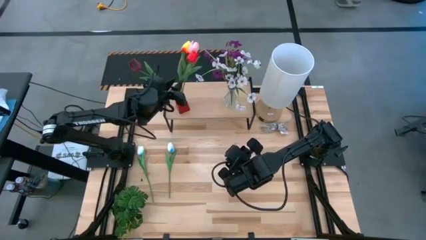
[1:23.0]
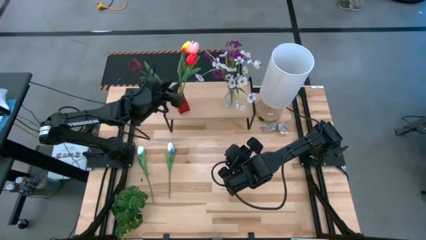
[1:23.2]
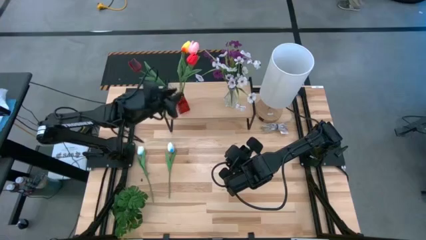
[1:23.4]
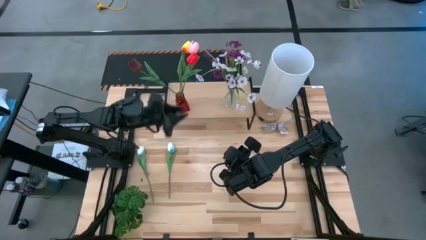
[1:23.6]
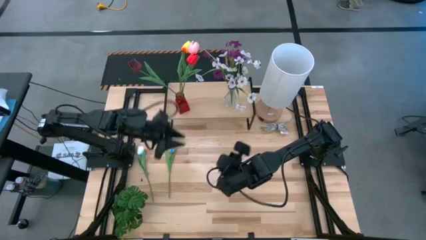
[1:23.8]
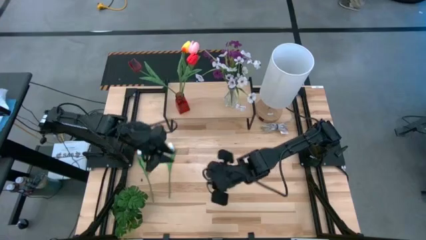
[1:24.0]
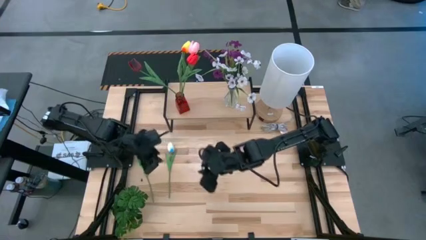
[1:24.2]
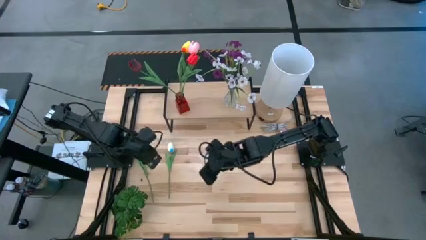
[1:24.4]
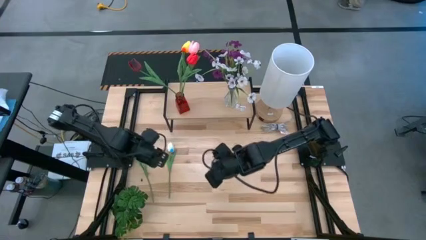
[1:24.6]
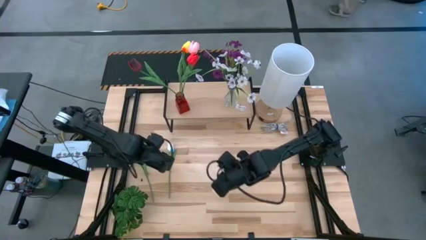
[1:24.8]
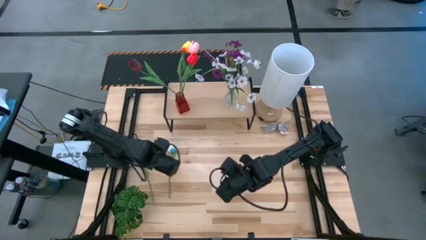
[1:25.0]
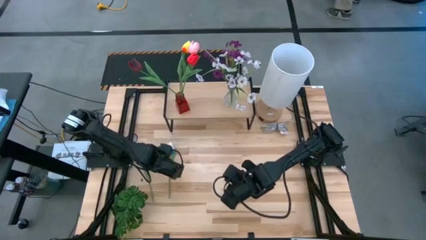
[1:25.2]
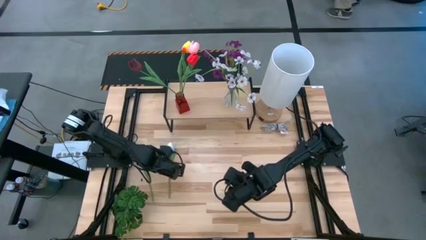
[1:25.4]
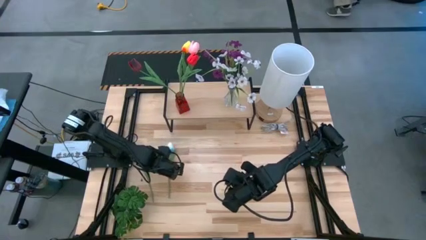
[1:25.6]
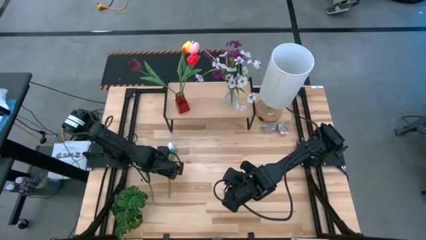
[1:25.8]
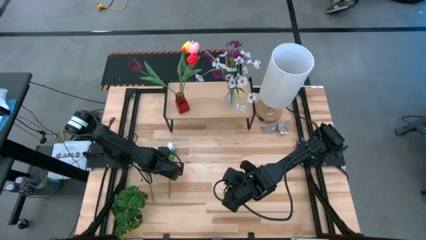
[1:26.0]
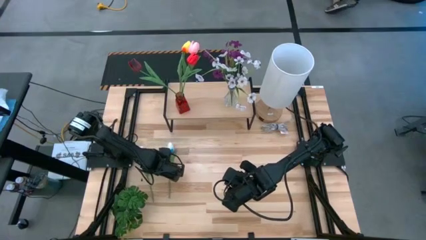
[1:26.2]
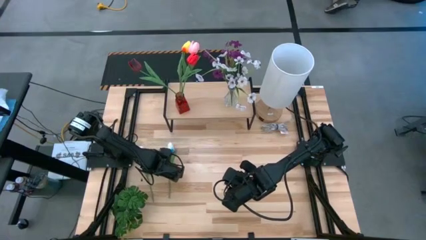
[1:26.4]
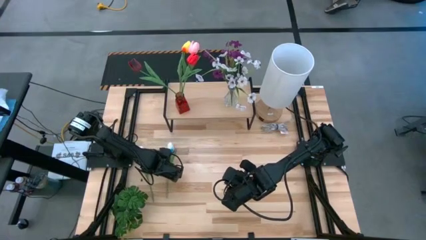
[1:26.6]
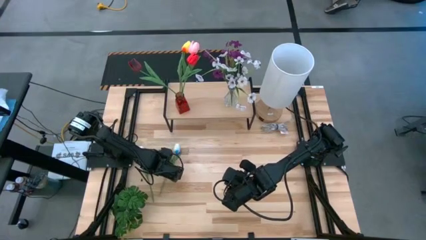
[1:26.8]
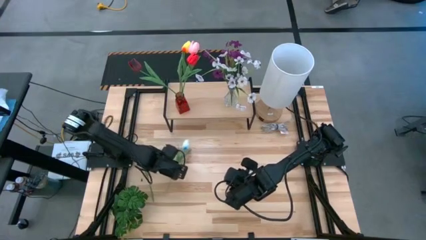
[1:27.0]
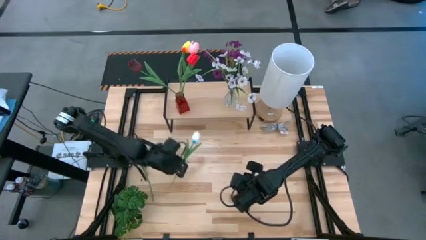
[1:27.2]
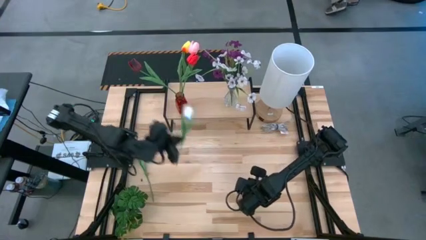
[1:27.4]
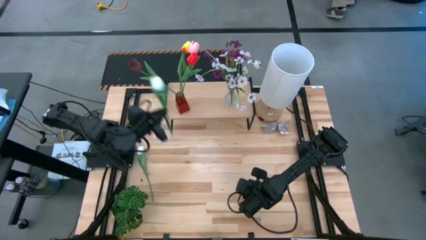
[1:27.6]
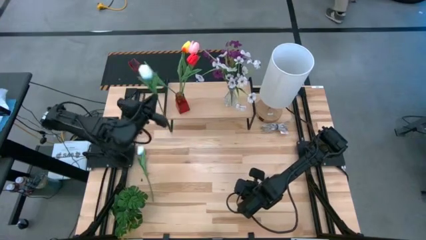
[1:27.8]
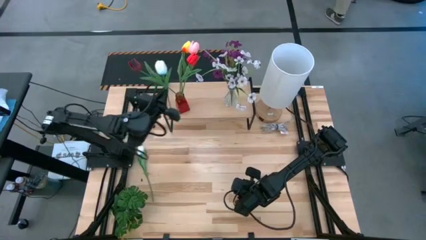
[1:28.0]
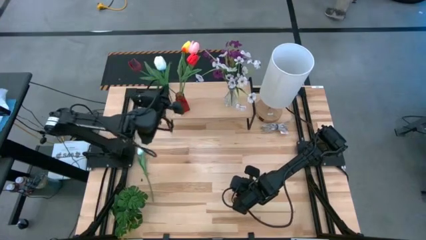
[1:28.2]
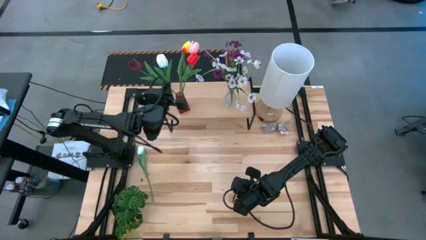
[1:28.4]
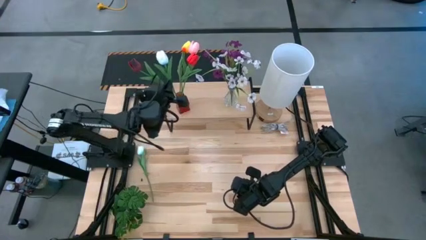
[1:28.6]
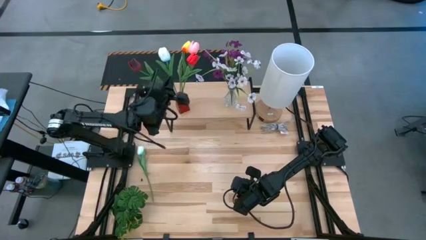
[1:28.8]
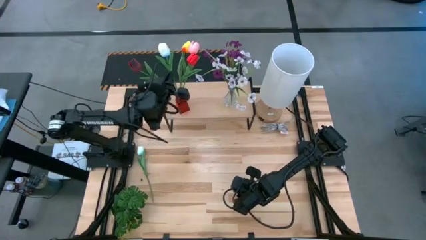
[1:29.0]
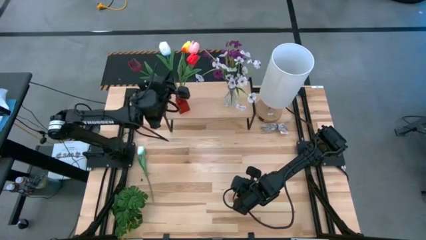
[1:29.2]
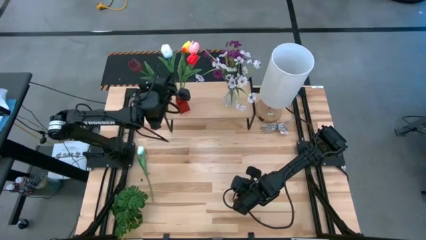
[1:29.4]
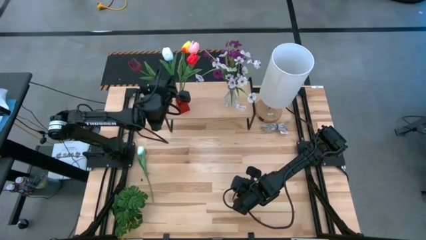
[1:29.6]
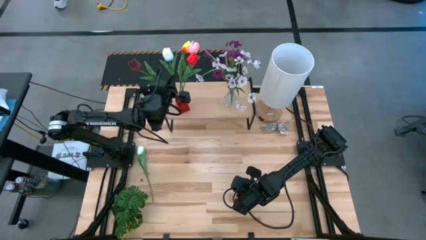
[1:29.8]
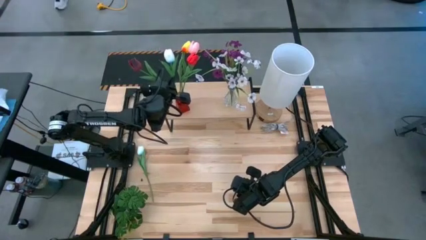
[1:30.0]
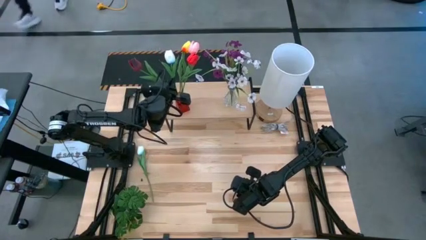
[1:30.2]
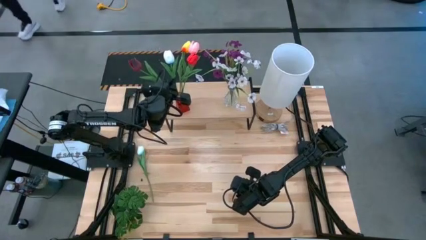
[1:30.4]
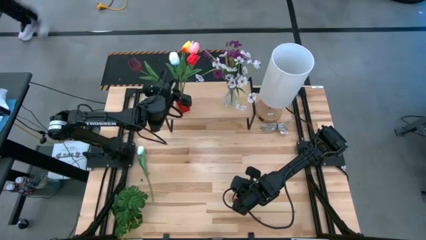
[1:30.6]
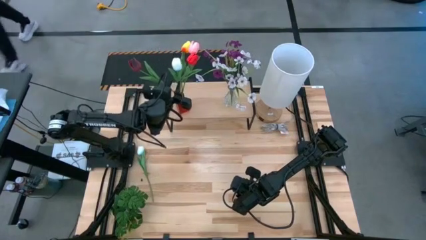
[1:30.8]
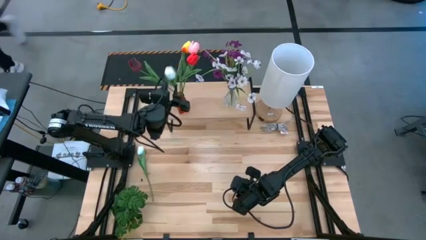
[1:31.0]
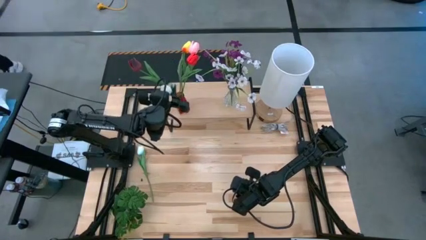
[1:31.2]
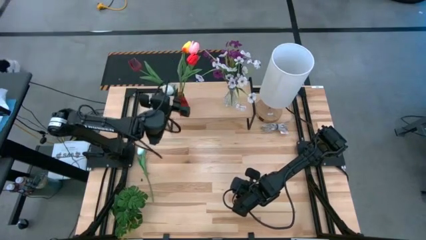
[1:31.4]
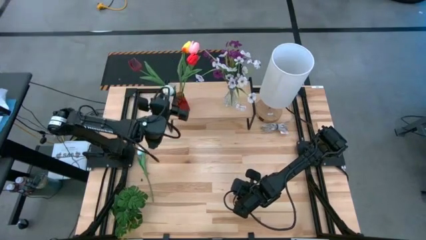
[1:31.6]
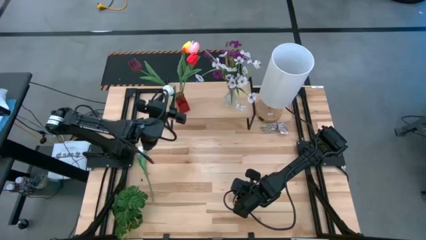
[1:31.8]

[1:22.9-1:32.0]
Task: Pick and place flowers into a vace then onto a shelf
Put the right white flower into the red vase on the shelf

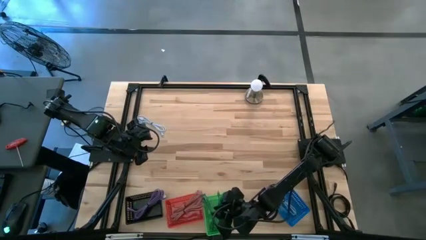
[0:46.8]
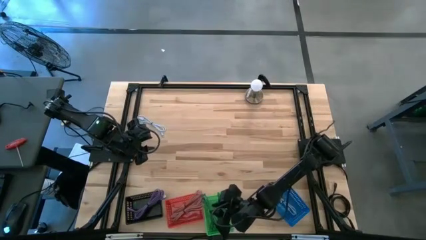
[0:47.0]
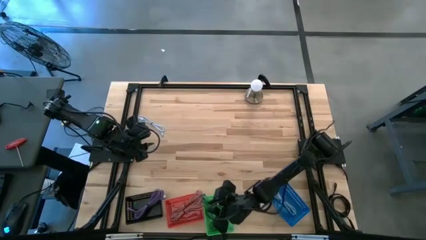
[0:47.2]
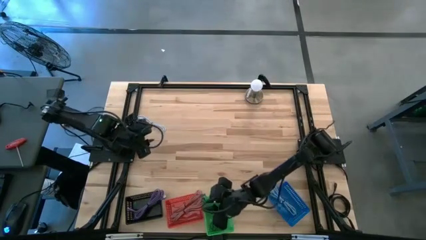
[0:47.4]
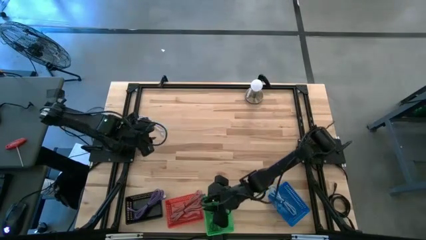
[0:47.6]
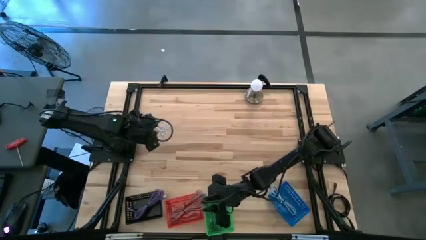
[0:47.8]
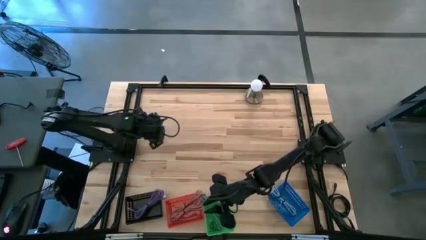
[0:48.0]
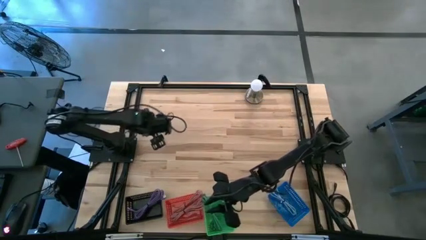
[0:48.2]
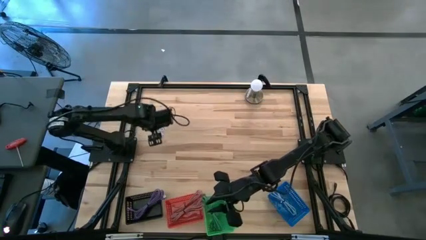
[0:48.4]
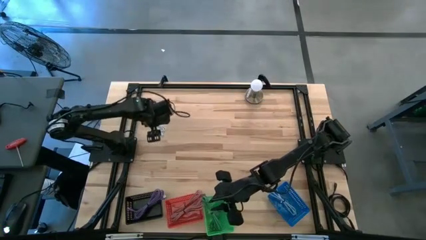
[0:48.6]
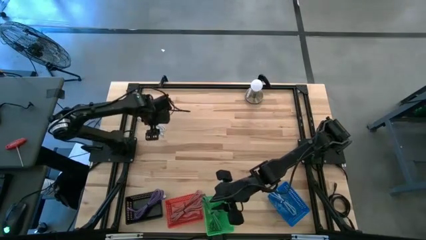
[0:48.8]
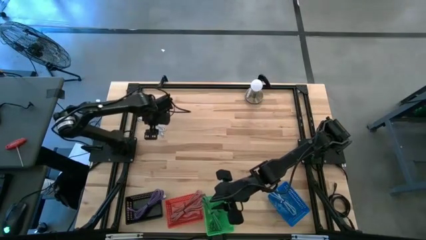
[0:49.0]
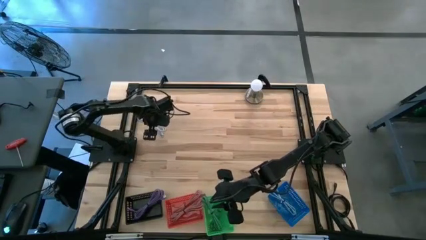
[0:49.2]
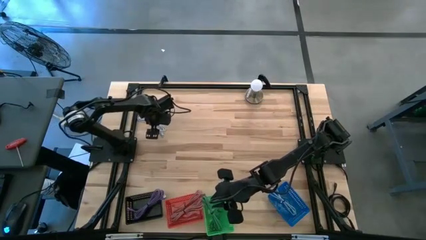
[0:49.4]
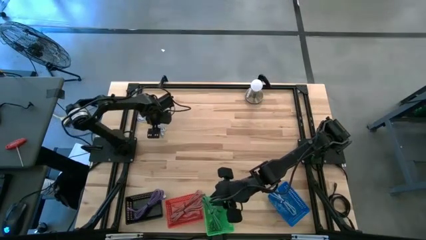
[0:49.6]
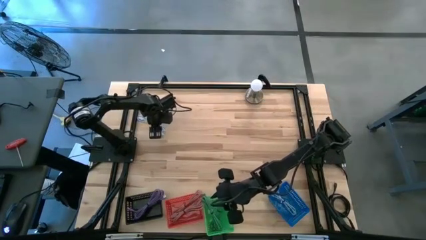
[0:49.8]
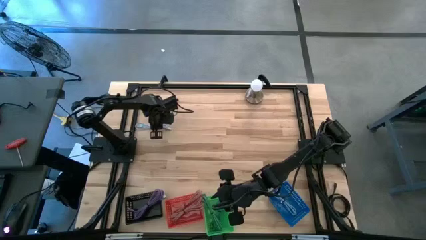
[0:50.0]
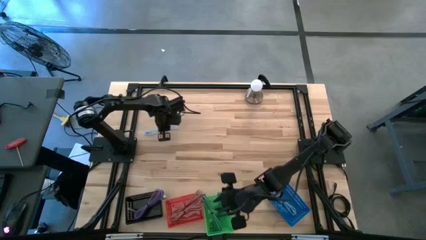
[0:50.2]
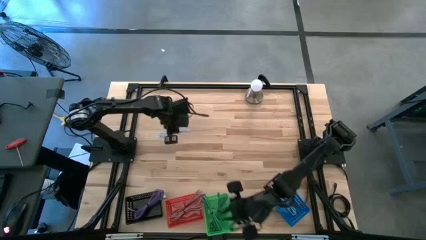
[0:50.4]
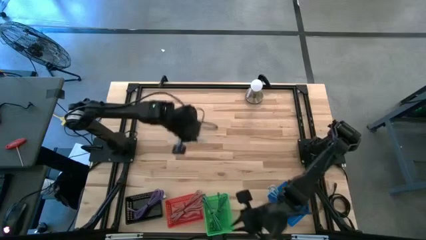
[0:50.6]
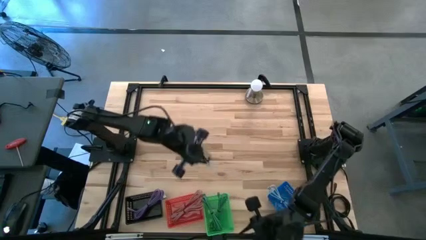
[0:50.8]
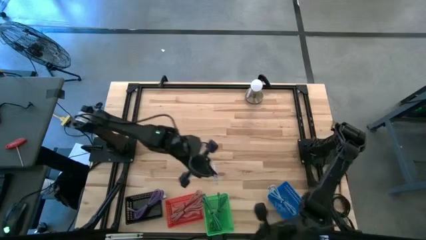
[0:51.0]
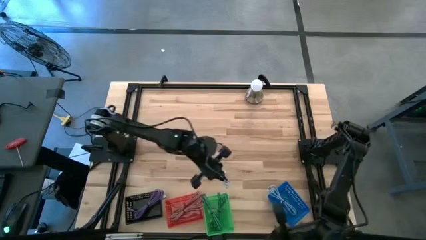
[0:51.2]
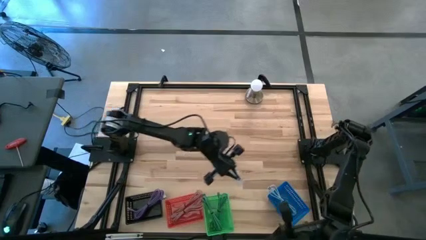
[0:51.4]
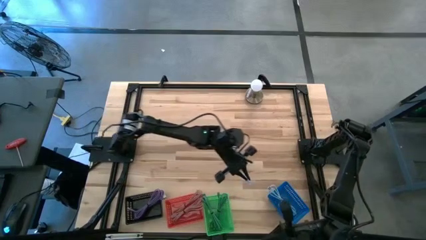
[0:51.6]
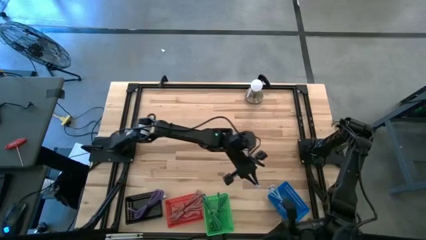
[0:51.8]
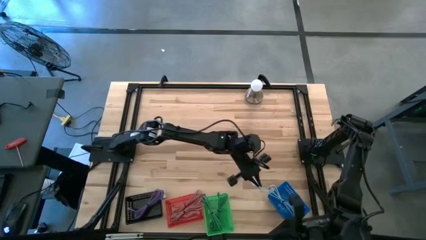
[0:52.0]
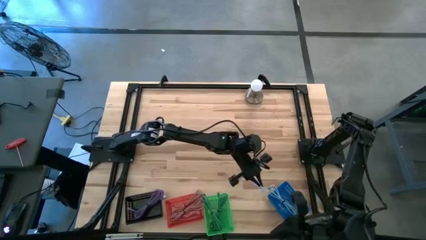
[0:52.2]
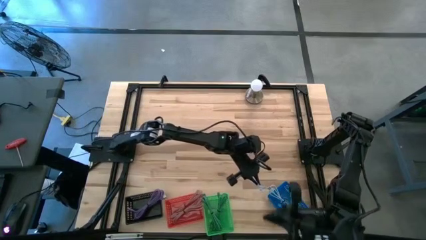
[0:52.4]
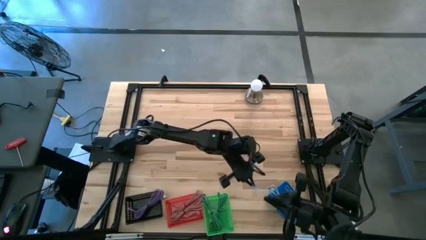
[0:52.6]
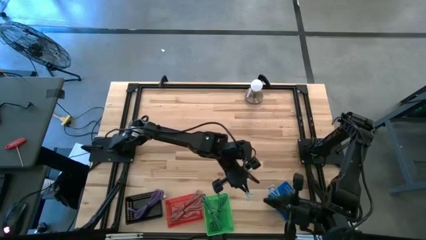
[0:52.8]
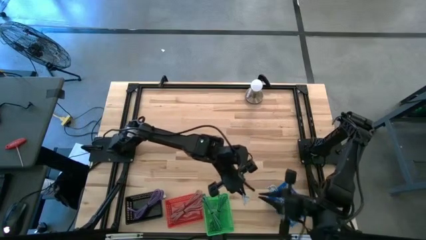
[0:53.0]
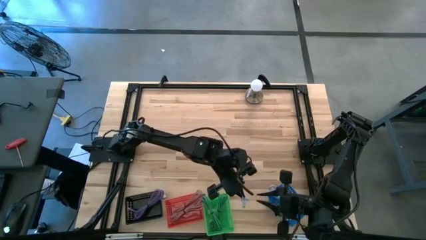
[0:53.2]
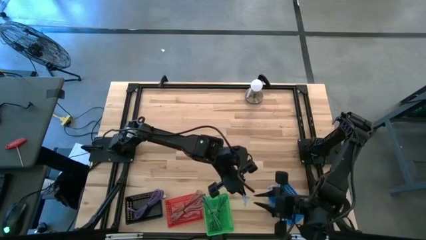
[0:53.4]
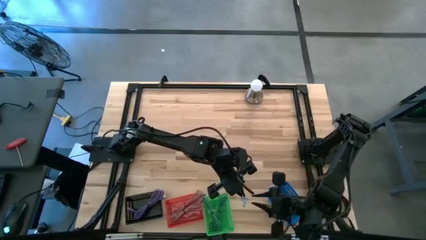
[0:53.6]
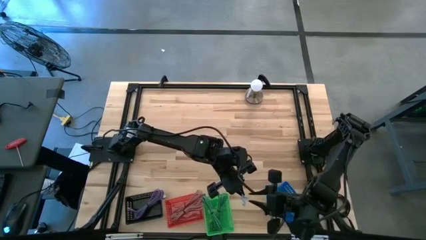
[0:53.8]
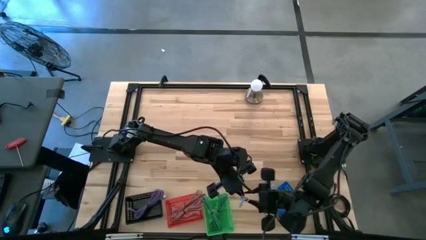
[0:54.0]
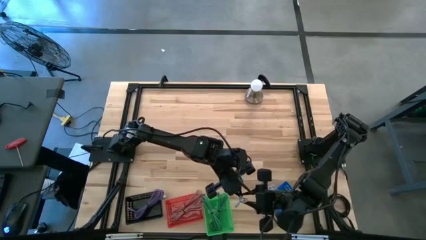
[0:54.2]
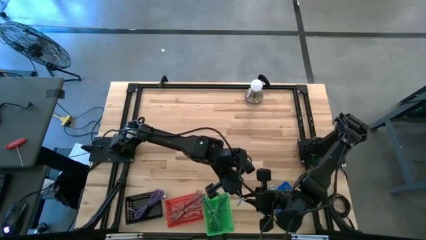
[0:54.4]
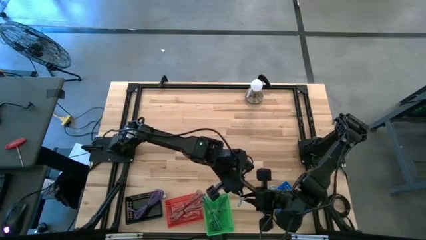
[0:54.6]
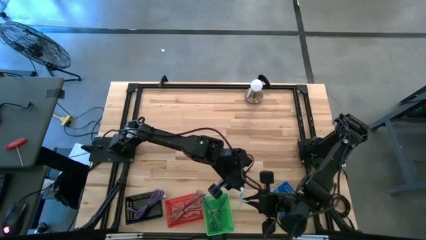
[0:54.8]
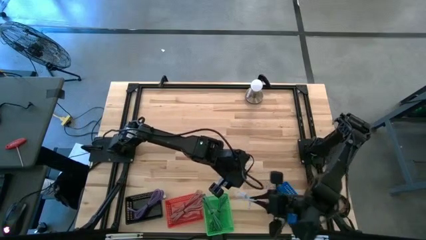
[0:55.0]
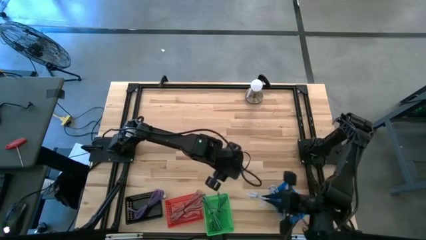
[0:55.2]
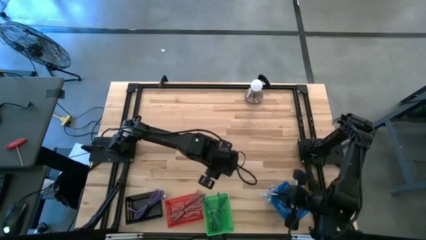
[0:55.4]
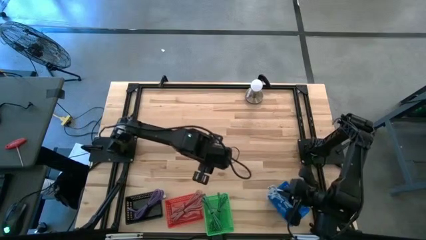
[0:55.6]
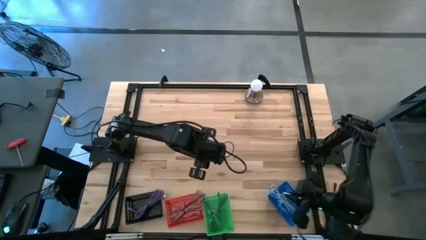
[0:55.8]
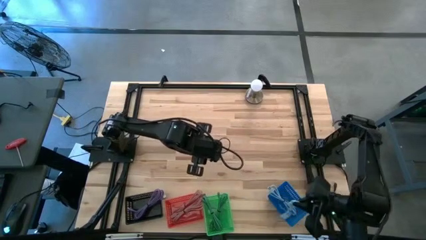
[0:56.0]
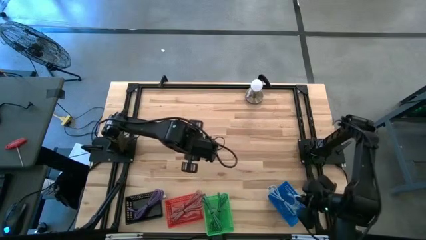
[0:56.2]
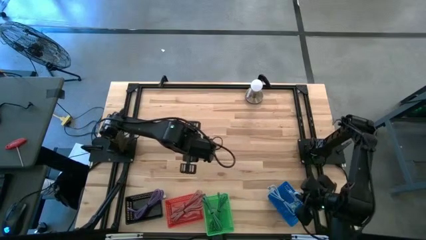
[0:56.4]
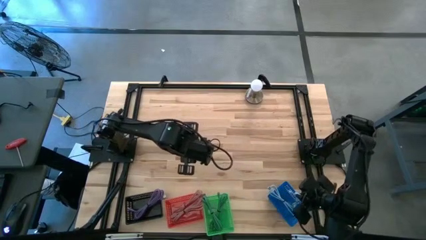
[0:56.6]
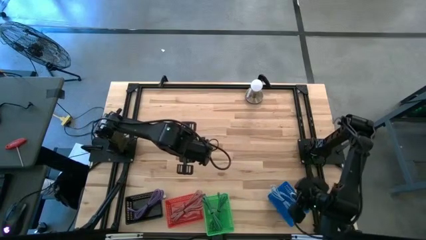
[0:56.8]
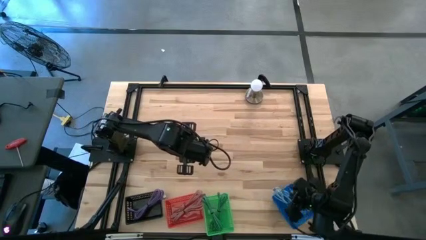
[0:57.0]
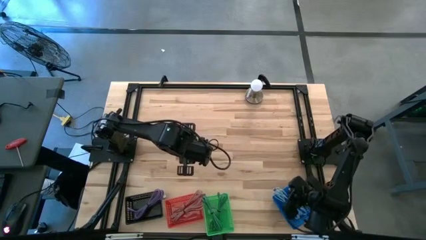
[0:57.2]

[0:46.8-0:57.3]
Task: Pick & Place USB Port
Put the blue USB charger into the blue bin
